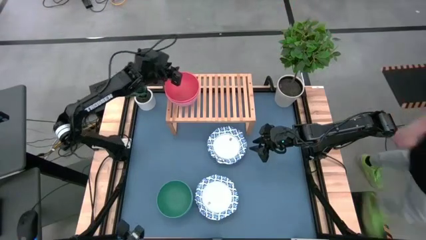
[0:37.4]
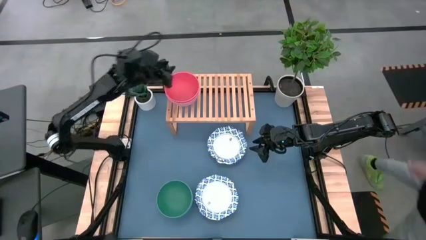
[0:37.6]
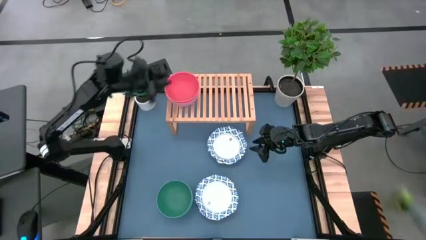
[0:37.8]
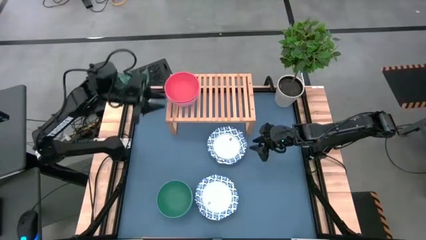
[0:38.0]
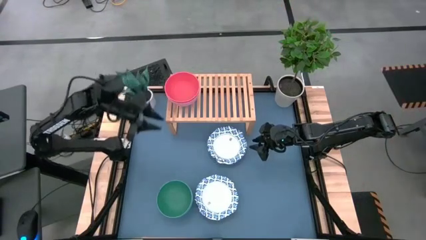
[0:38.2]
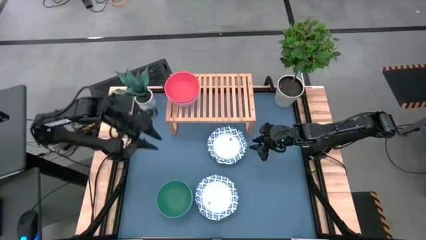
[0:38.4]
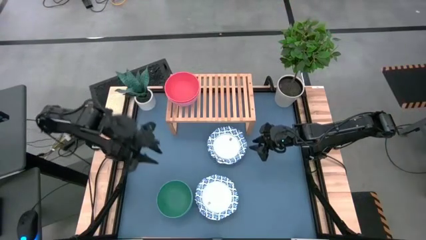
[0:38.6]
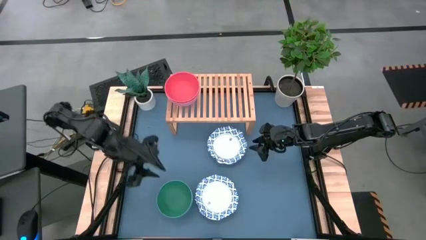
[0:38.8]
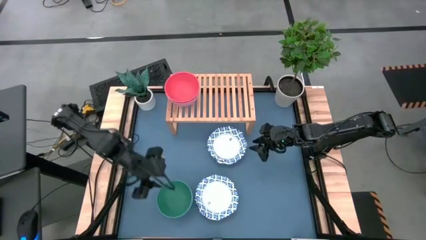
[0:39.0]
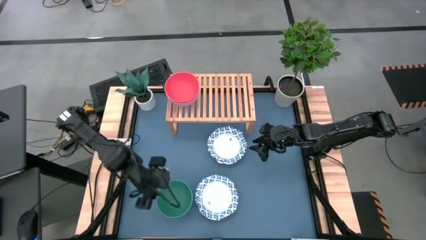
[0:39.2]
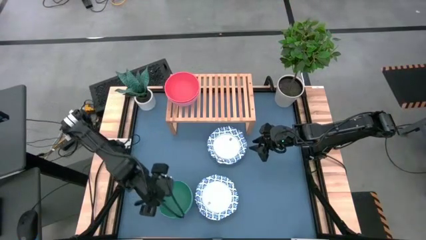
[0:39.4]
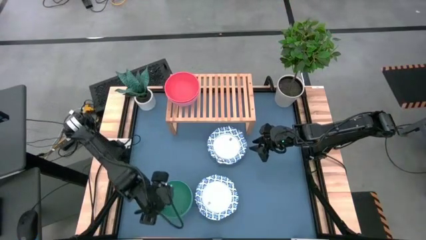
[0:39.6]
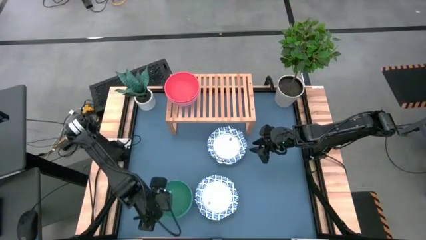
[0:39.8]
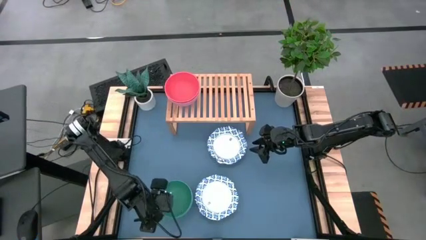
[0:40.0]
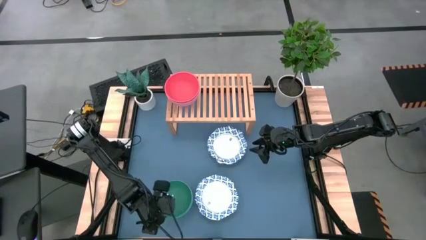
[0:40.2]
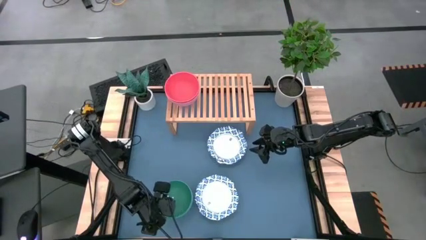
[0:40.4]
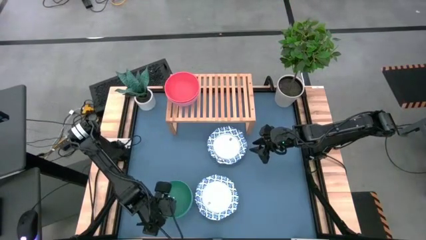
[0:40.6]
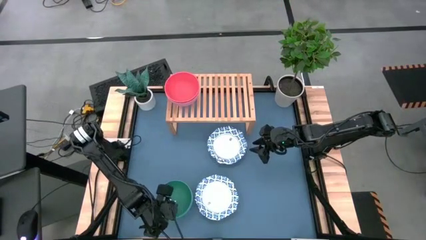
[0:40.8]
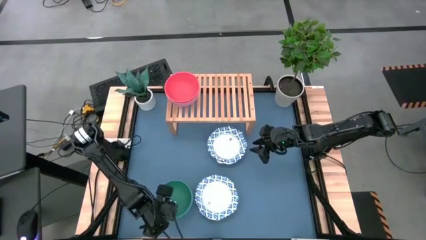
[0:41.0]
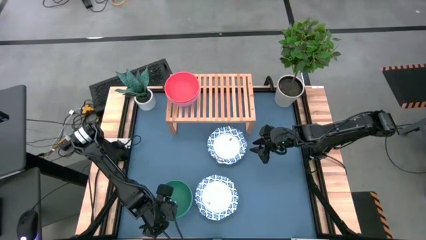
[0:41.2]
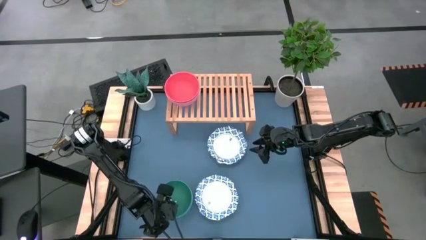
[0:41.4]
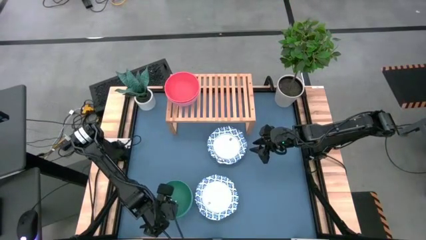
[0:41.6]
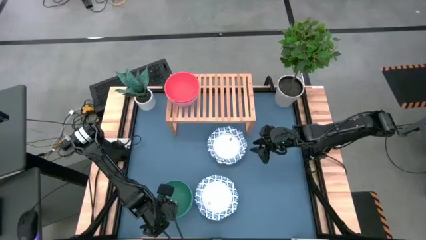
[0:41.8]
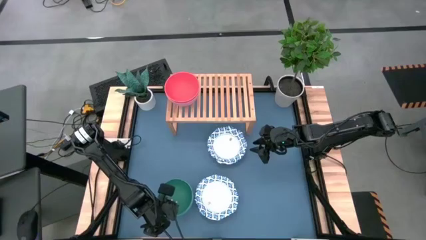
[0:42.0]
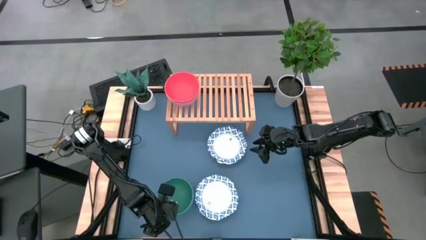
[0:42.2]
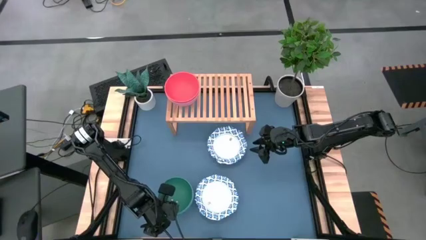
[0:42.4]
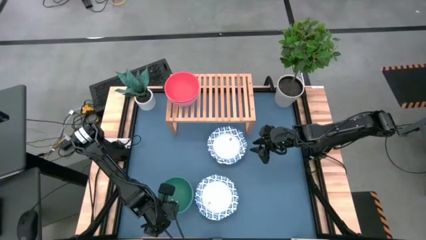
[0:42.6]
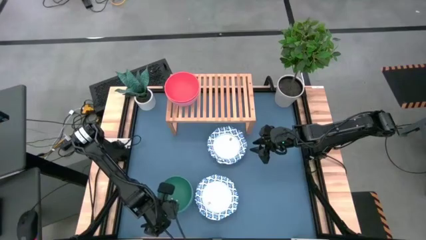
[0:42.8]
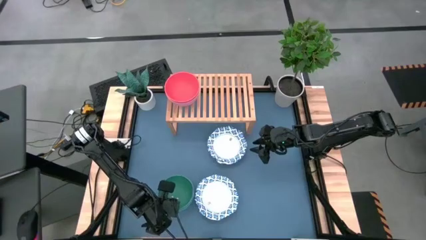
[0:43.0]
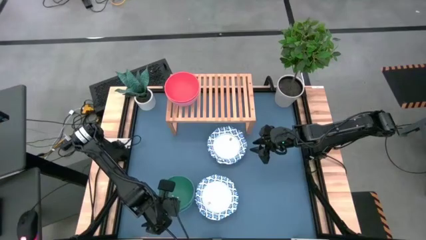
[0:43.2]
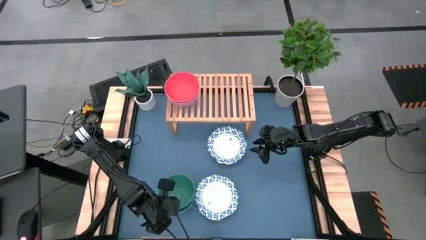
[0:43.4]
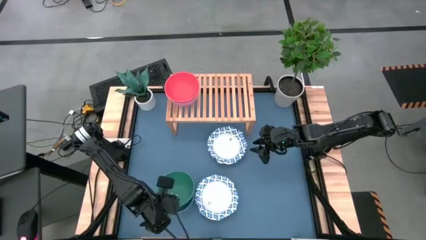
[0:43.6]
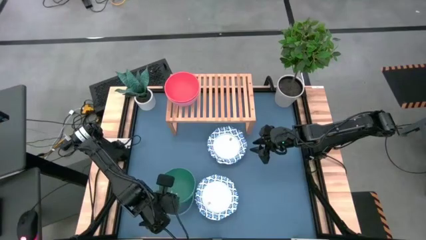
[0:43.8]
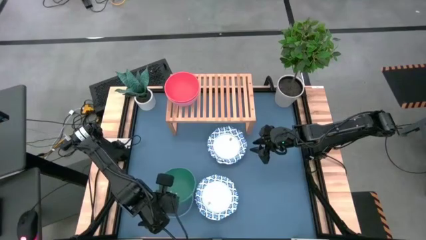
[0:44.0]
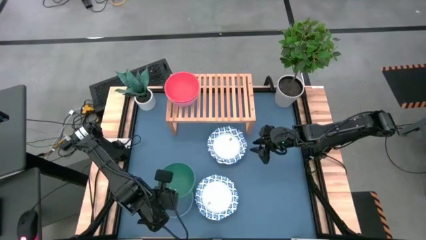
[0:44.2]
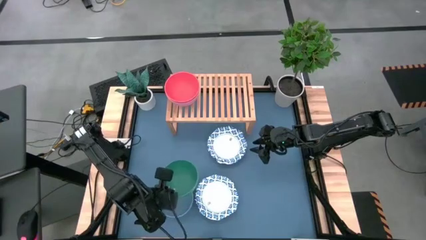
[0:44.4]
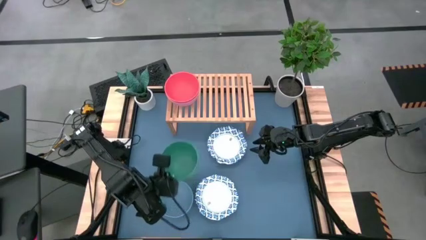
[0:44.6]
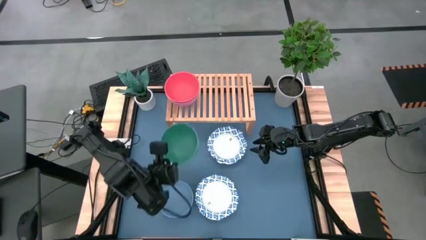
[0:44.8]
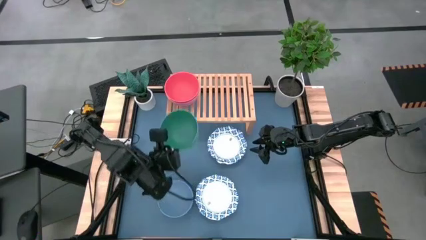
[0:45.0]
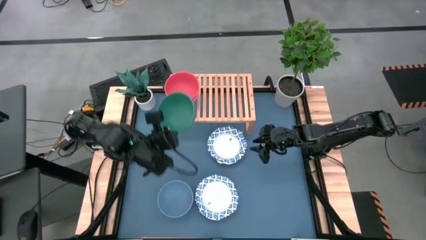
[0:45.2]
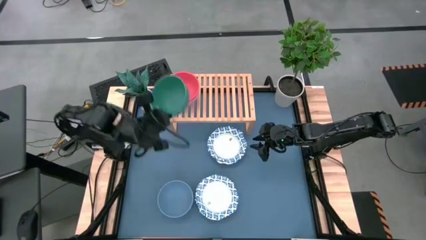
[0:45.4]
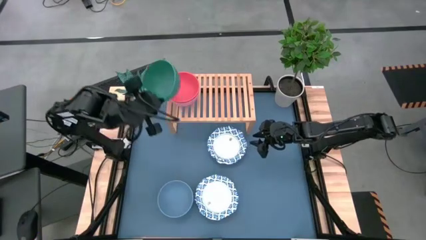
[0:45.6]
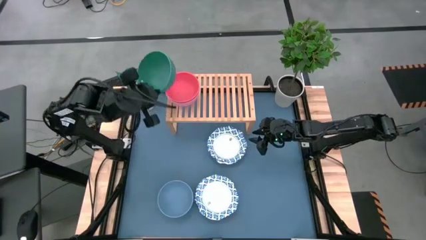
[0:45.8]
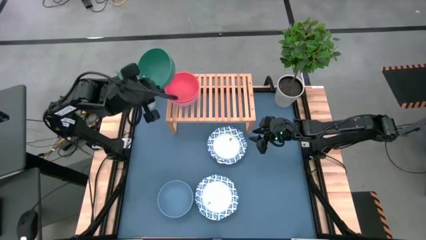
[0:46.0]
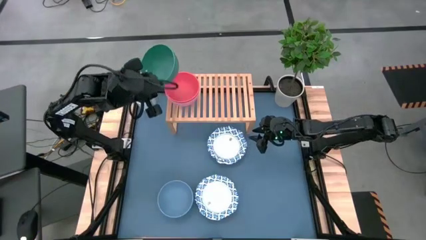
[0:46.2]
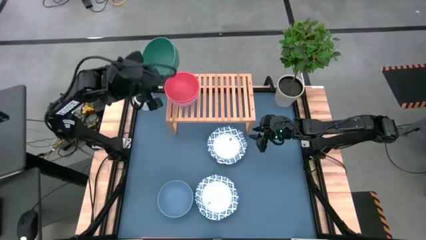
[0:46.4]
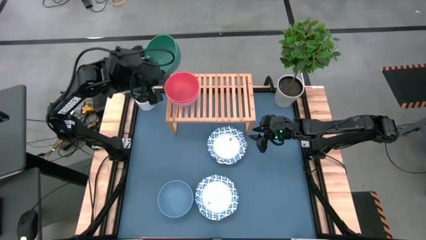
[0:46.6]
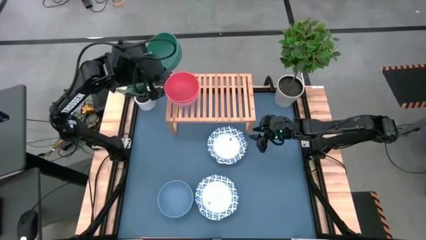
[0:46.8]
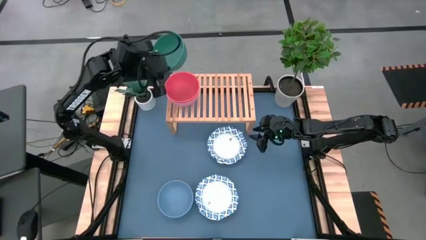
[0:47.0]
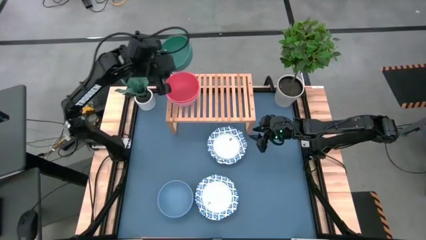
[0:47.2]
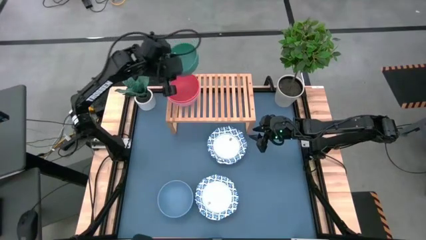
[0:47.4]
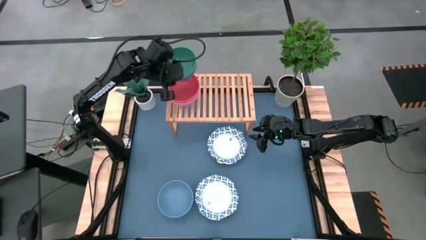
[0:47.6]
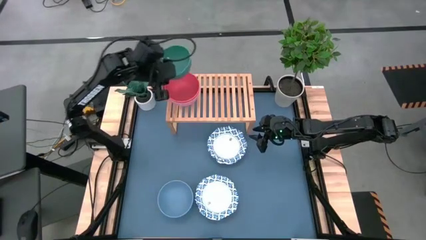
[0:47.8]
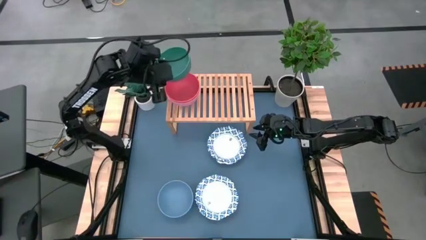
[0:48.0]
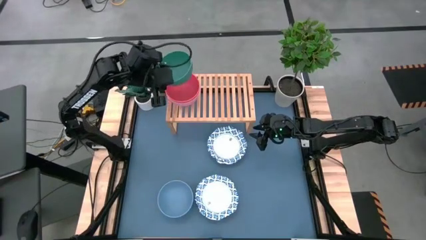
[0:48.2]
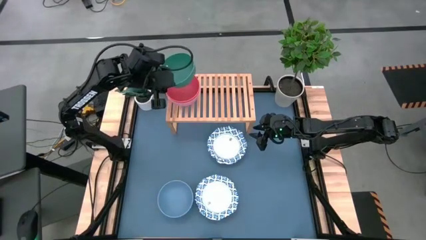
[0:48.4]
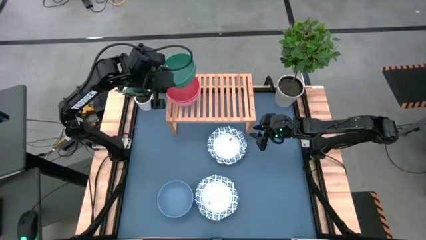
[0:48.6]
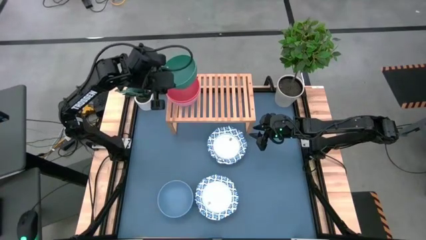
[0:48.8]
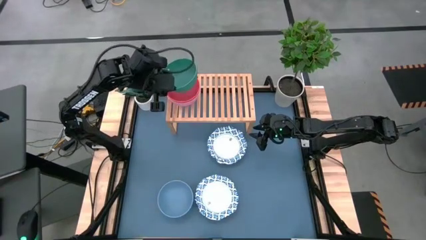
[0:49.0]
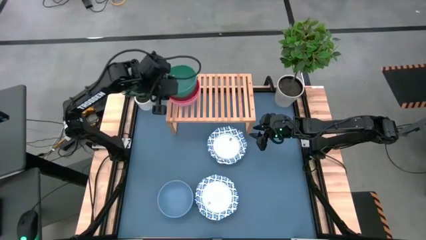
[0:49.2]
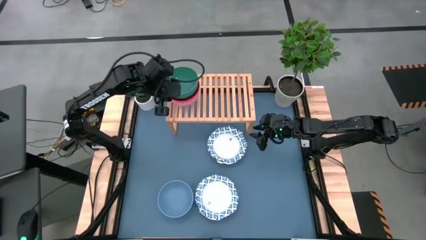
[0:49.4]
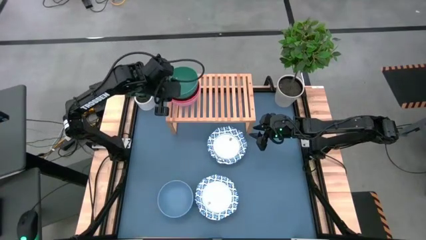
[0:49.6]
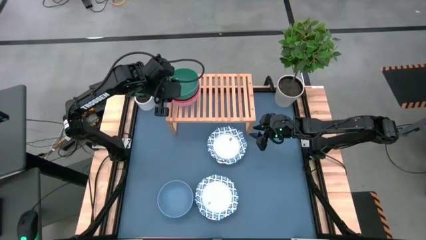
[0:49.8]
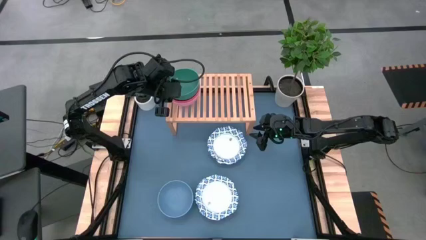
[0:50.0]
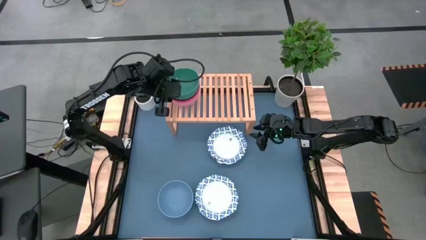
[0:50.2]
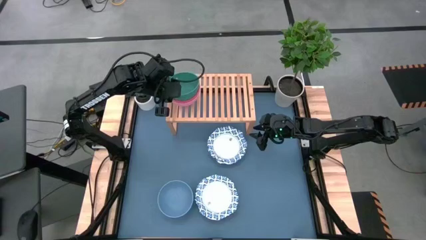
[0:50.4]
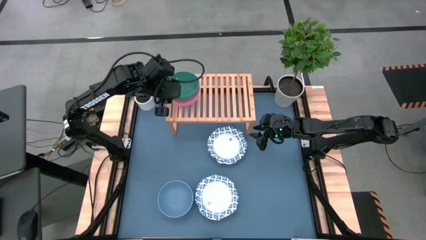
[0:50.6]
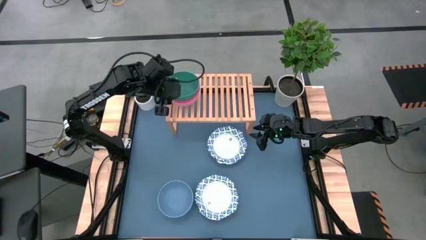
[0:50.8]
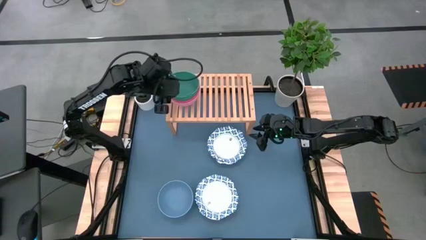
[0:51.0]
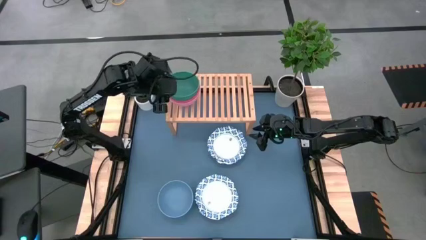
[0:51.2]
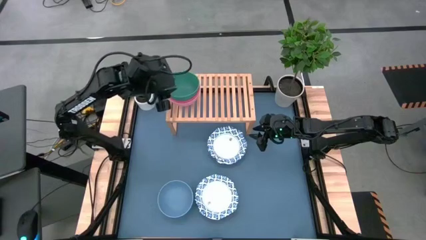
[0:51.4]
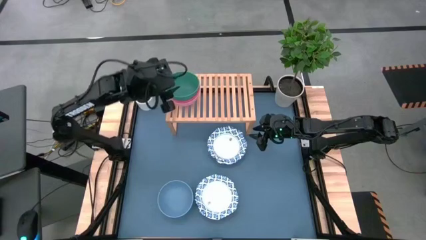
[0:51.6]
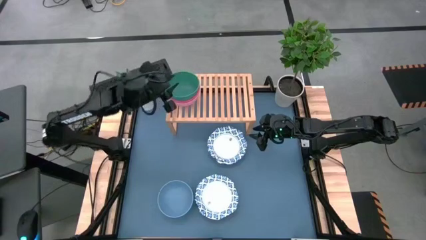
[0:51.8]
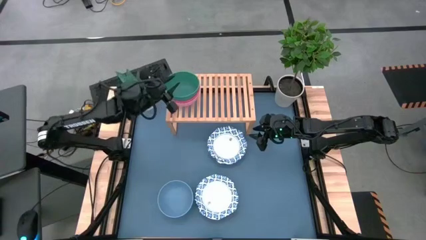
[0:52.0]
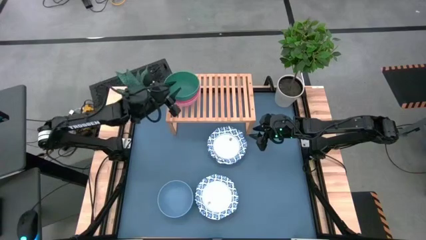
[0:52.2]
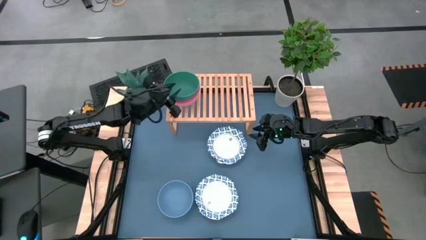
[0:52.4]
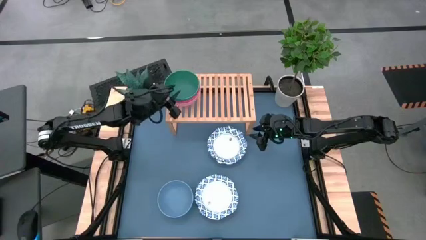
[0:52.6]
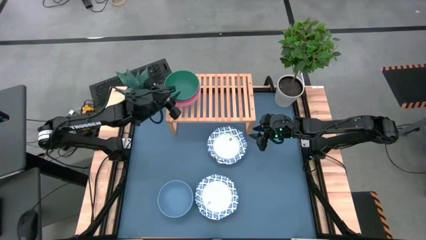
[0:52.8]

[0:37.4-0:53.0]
Task: Place and stack bowls onto a shelf
Stack the green bowl on top of the orange bowl on the shelf
